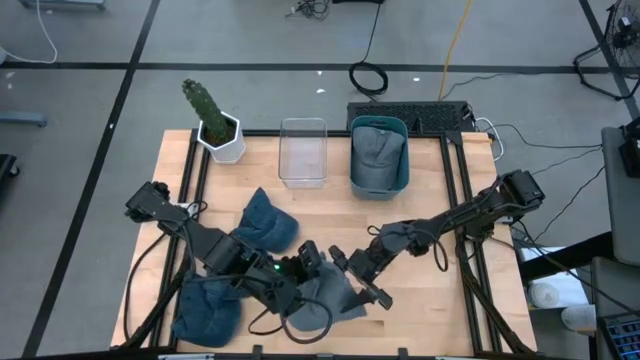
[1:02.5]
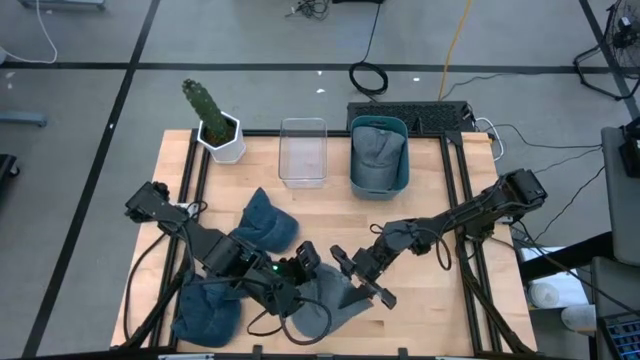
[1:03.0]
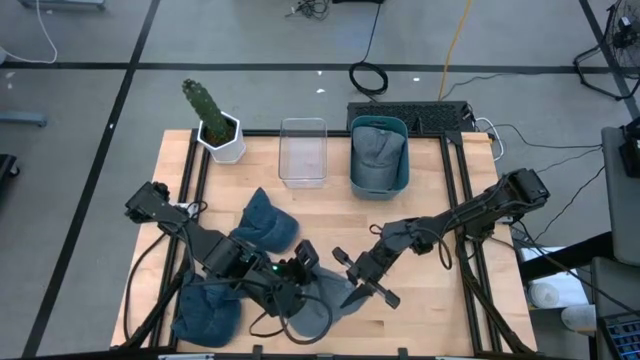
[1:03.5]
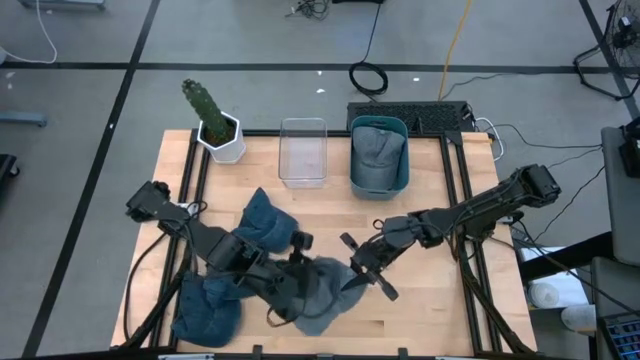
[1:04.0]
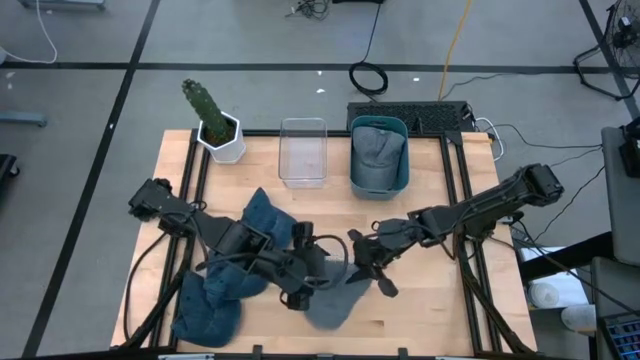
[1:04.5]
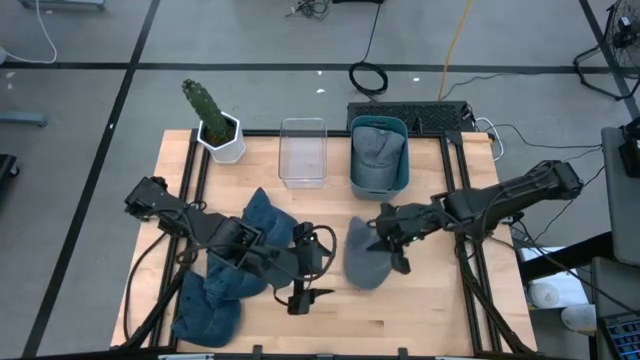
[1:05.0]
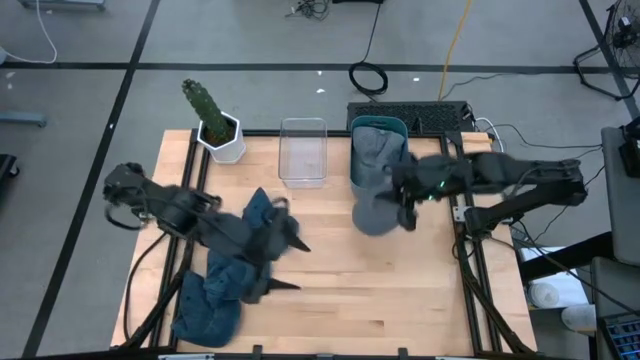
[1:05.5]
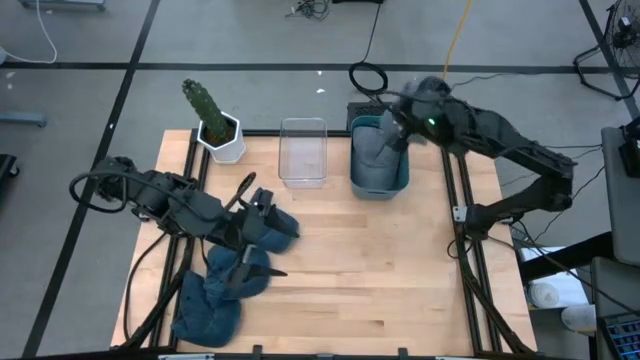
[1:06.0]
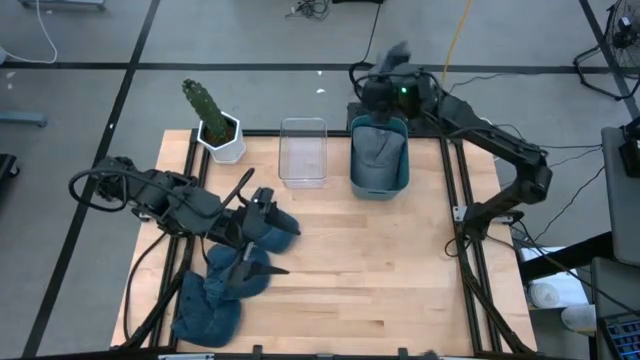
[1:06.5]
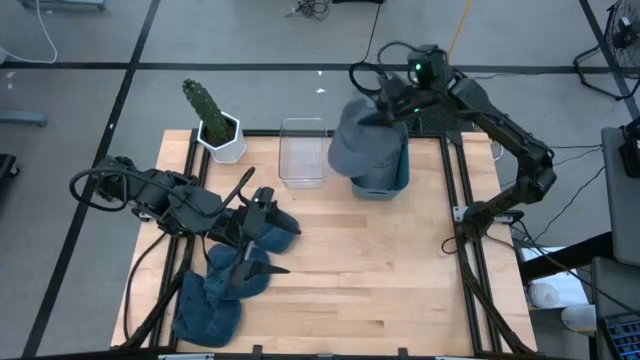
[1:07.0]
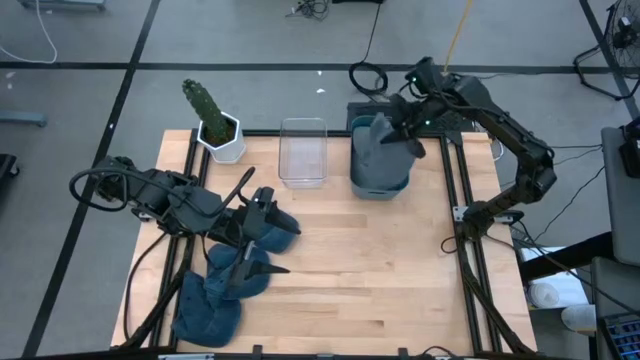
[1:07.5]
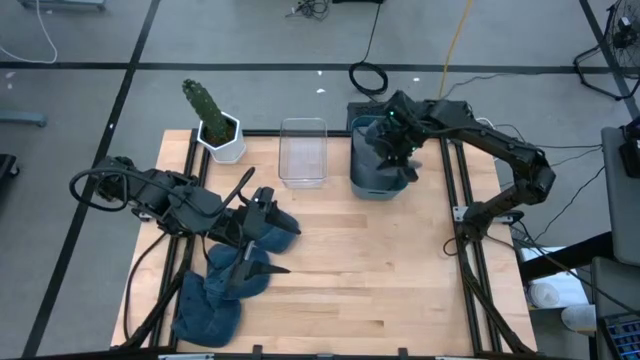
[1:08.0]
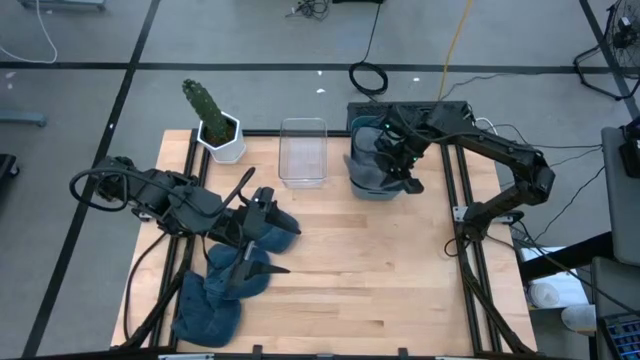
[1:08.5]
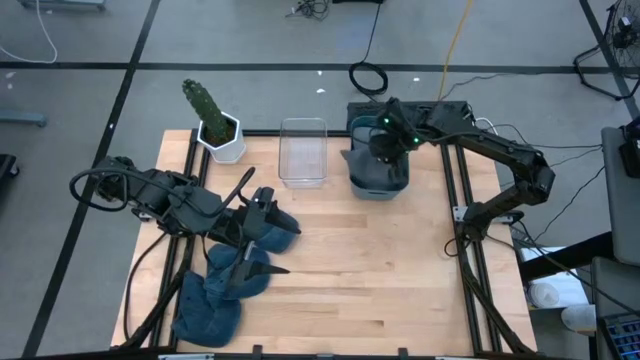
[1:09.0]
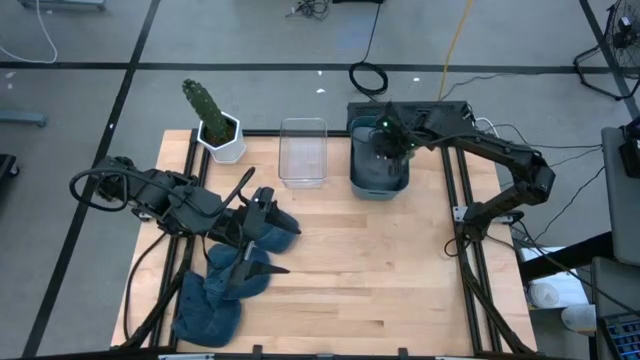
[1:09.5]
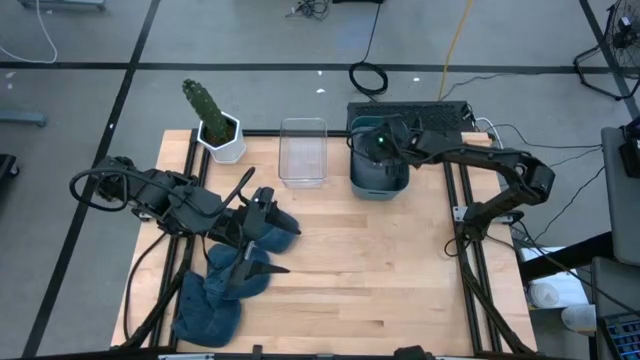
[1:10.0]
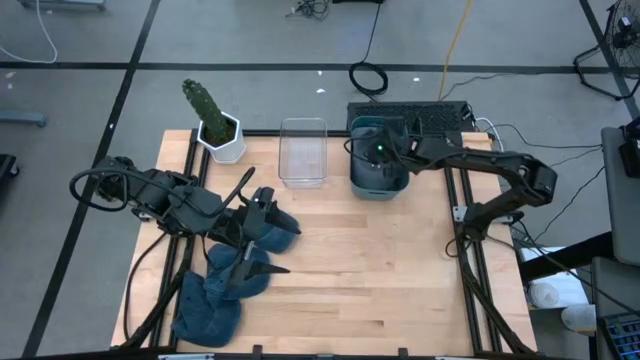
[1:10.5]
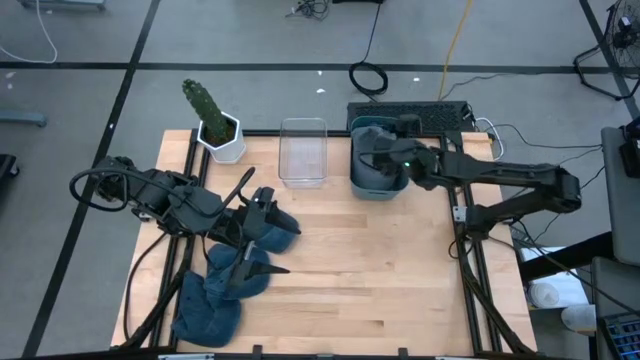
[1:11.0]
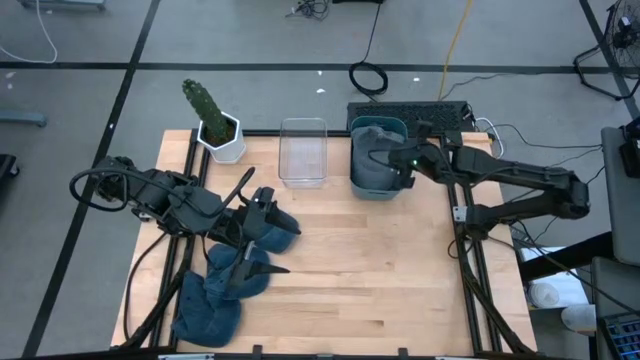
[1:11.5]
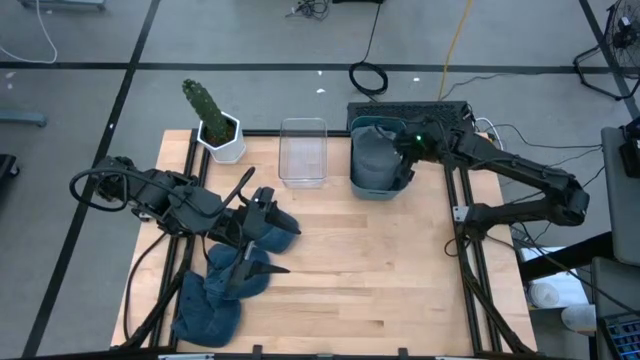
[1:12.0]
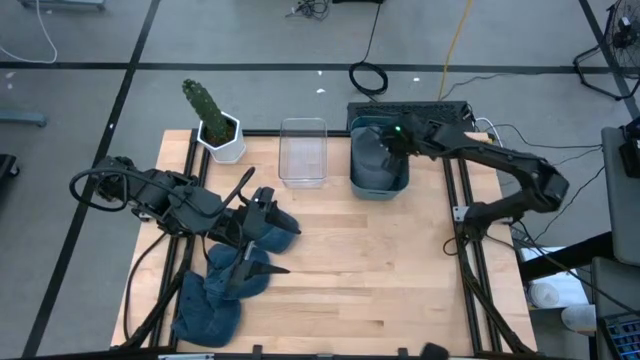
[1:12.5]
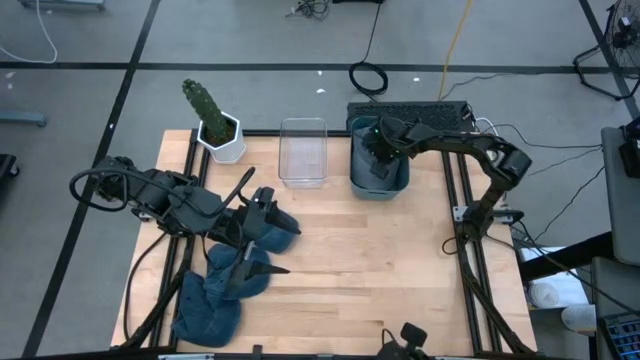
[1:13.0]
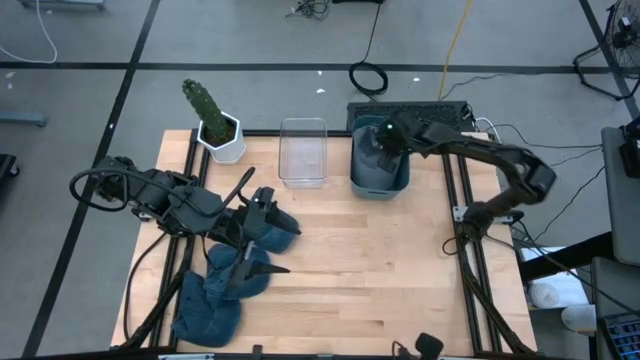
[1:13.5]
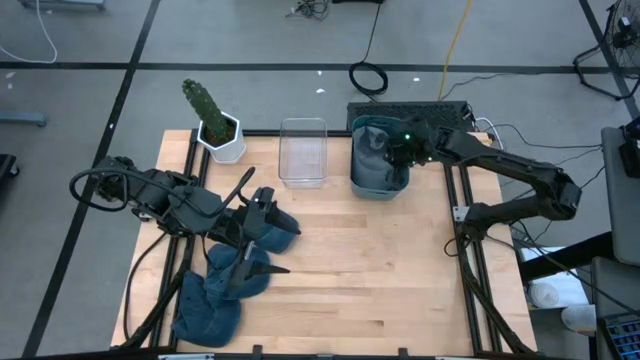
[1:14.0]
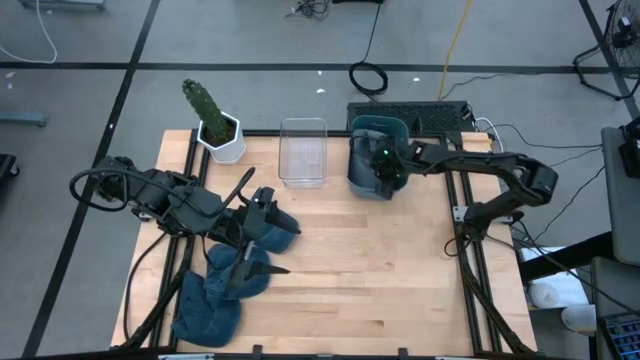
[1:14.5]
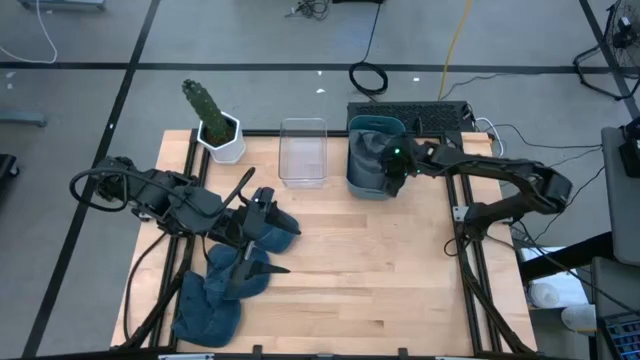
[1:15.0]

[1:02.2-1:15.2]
Task: Pick & Place hat
Put the gray cap into the blue bin

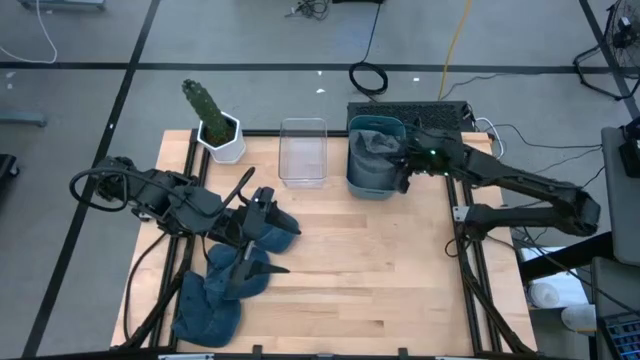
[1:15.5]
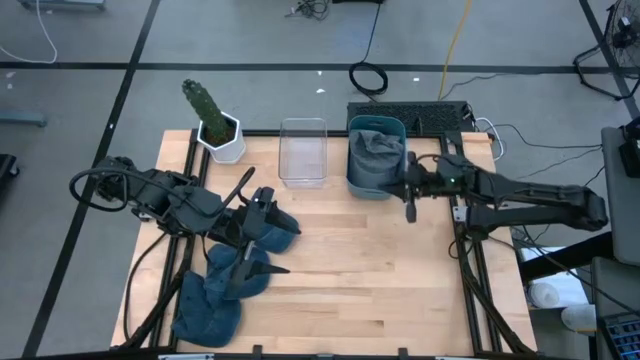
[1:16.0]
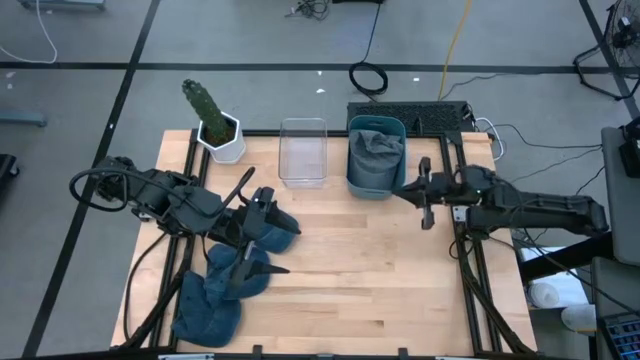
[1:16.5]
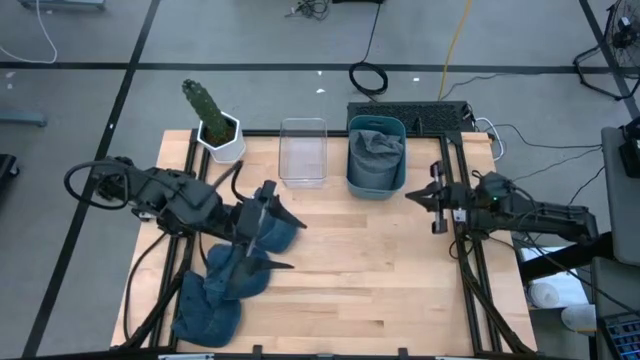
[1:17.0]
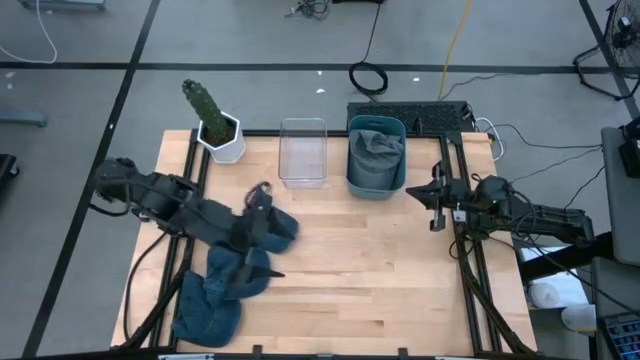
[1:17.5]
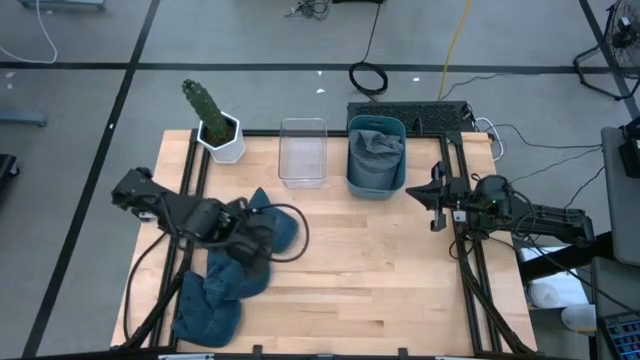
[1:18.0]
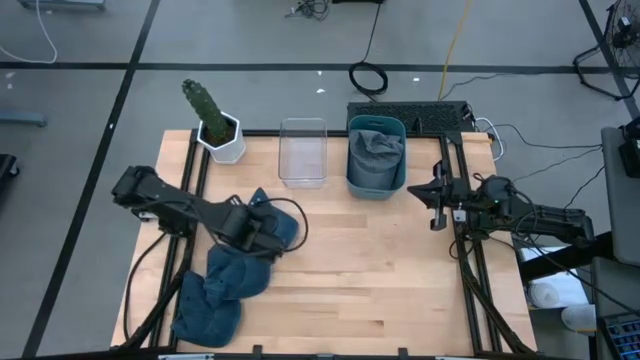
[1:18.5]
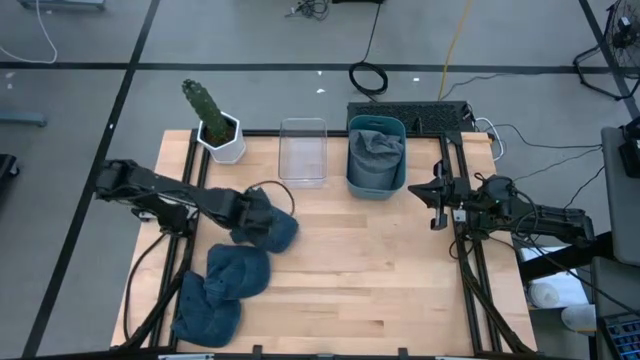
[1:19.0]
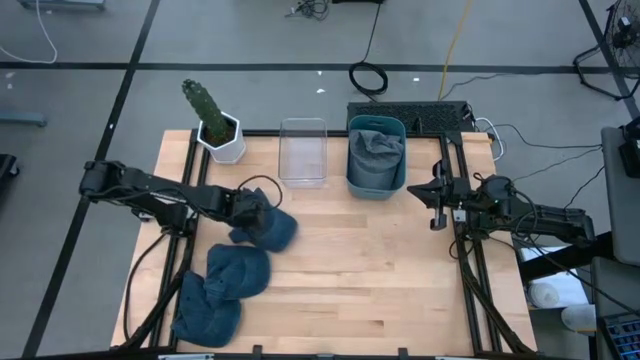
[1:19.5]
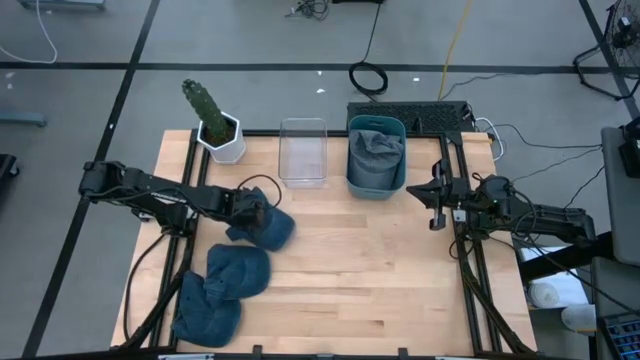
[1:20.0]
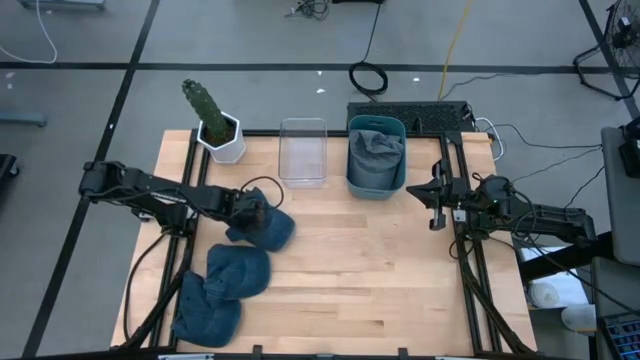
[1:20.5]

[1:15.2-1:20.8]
Put the top blue cap into the transparent bin

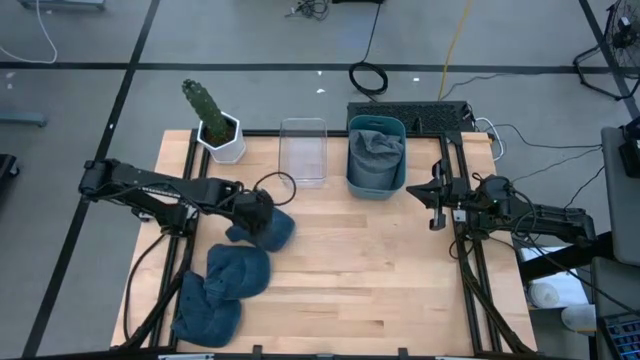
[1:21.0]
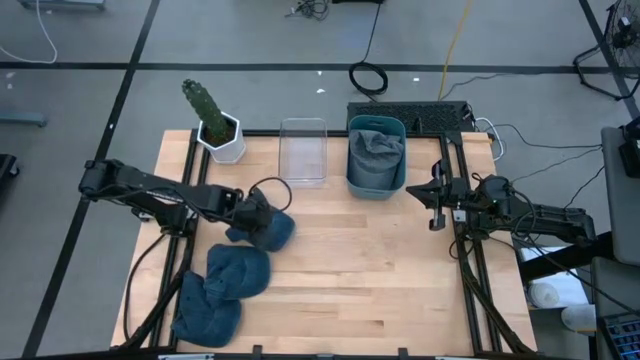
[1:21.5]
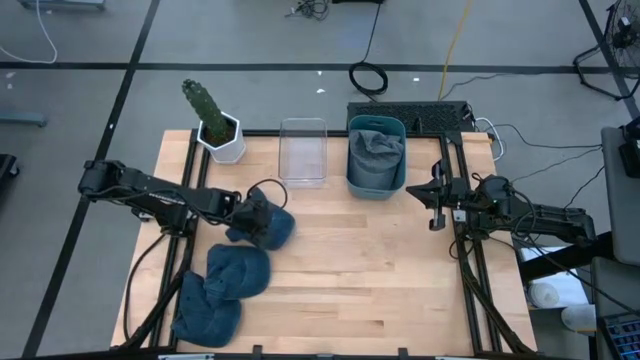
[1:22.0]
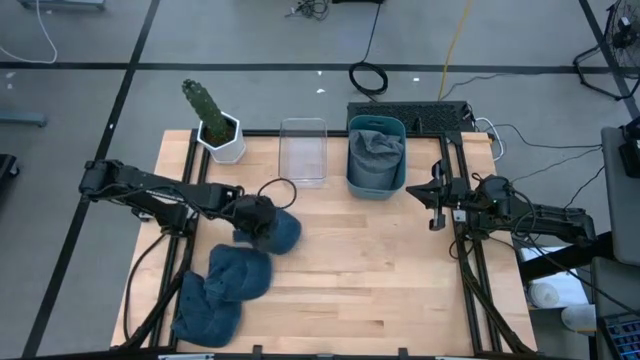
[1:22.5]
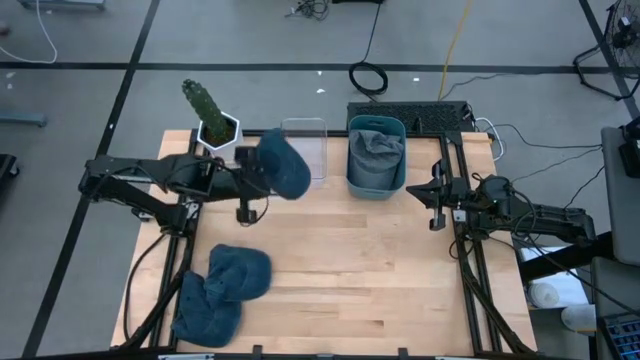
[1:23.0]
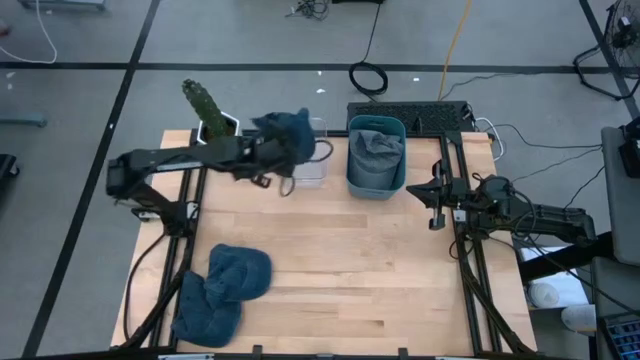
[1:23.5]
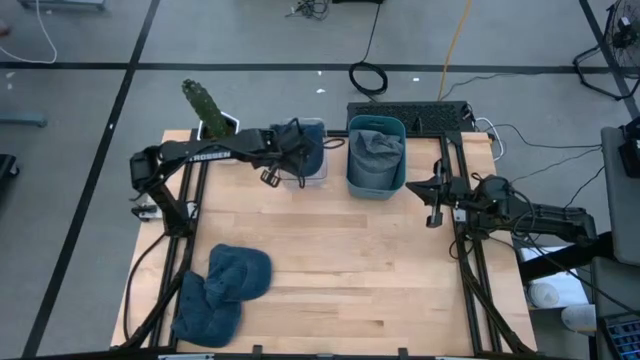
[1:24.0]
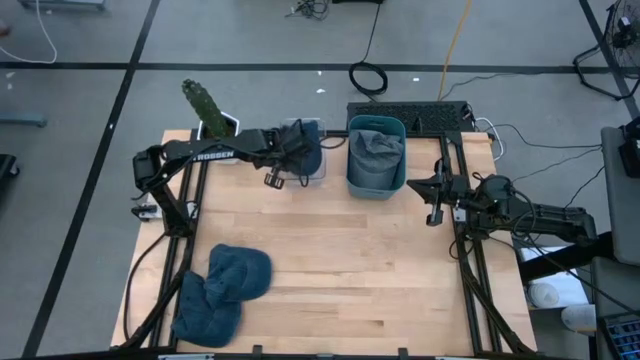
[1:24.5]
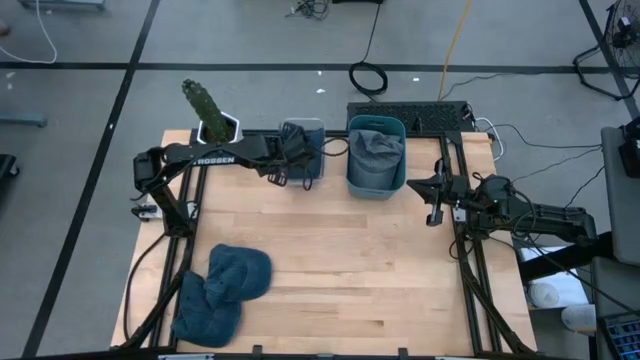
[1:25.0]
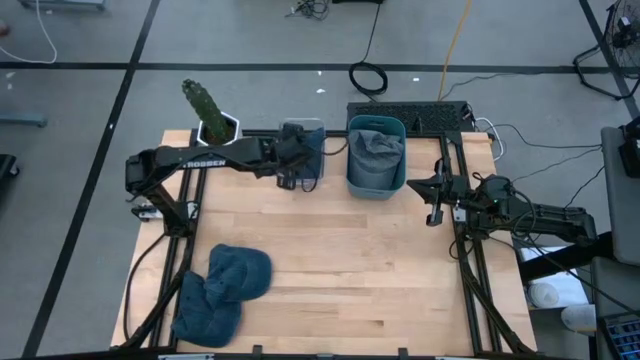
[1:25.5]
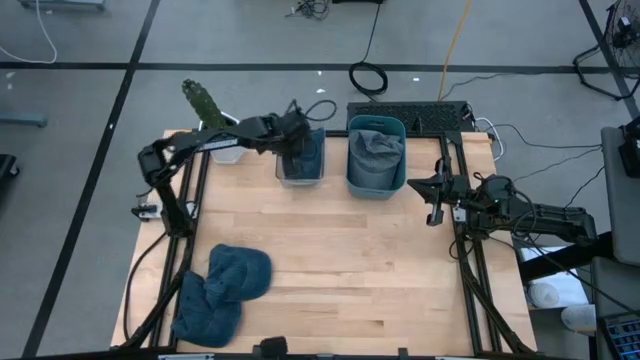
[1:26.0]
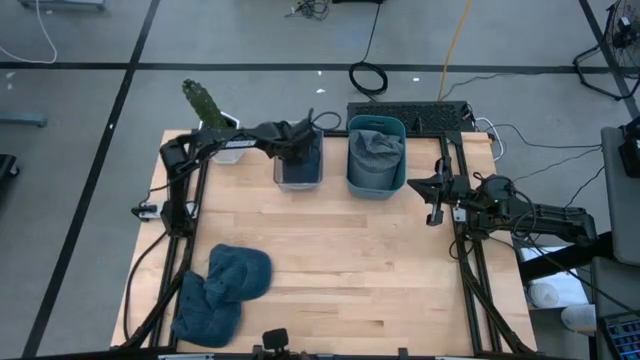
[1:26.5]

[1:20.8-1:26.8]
Put the top blue cap into the transparent bin
